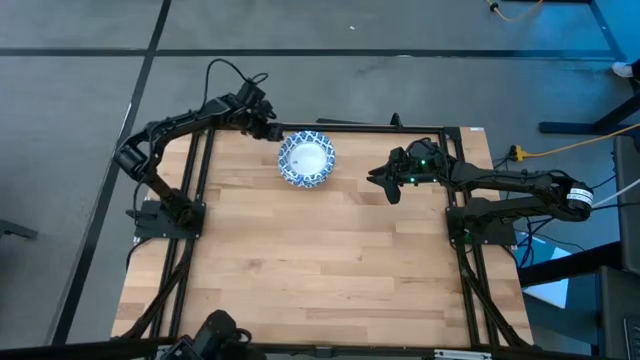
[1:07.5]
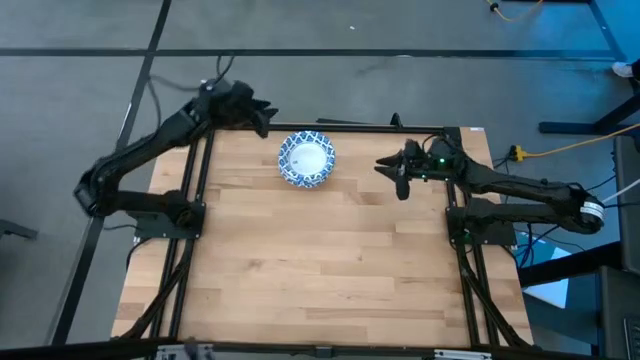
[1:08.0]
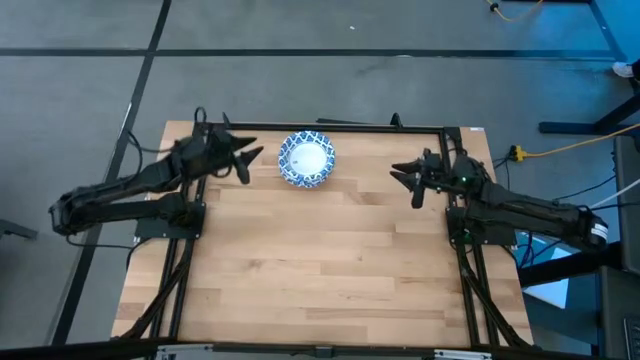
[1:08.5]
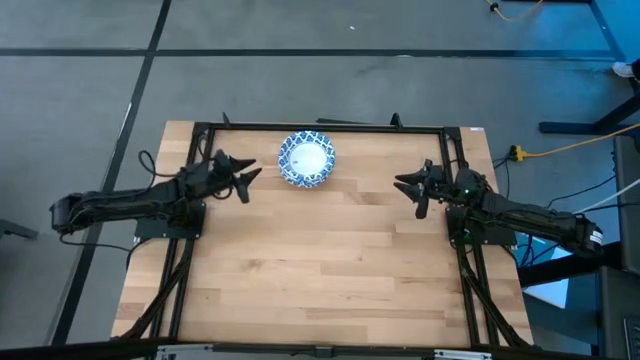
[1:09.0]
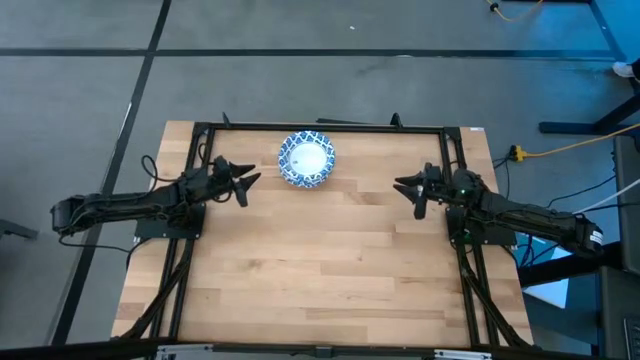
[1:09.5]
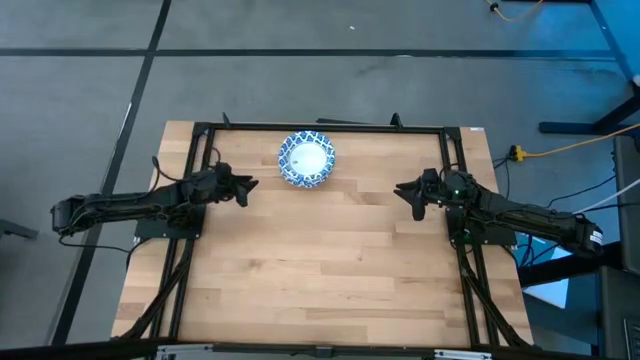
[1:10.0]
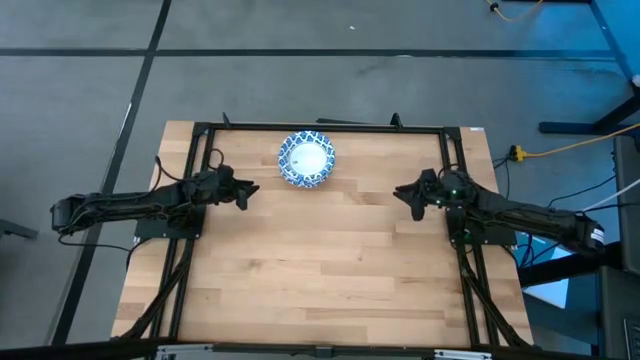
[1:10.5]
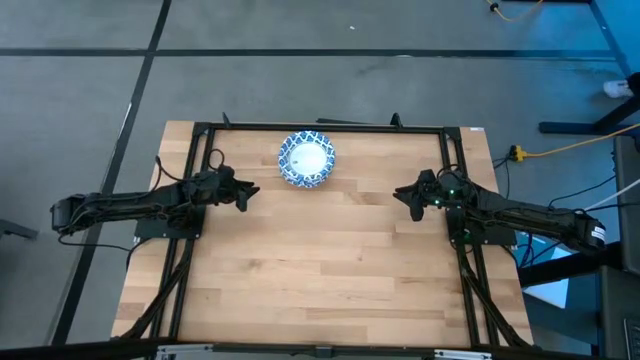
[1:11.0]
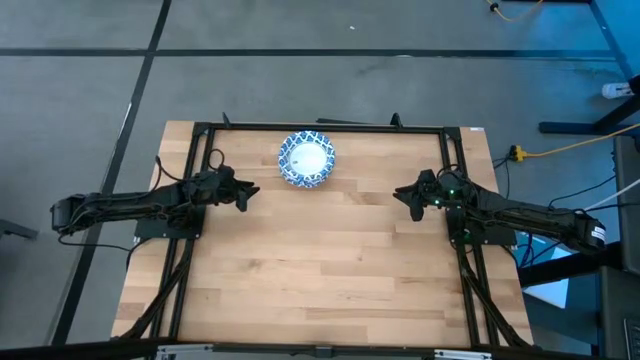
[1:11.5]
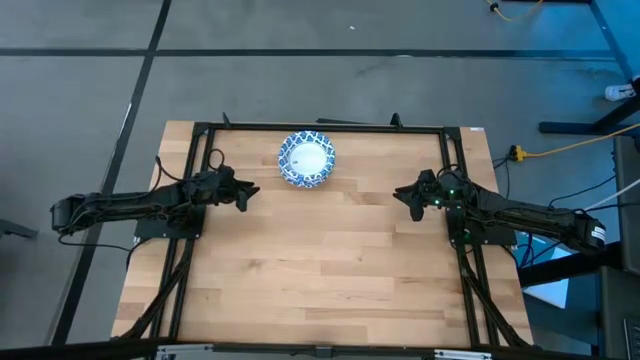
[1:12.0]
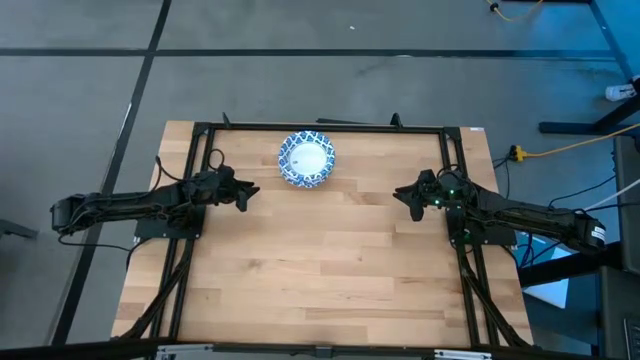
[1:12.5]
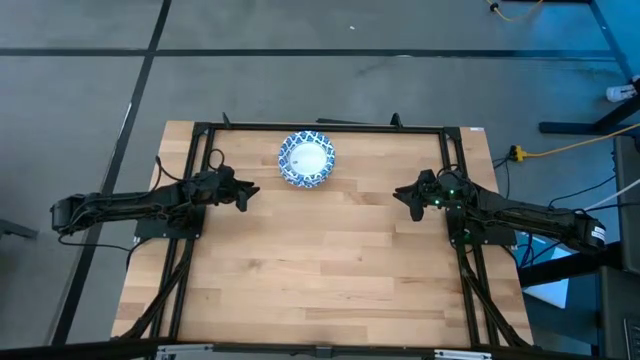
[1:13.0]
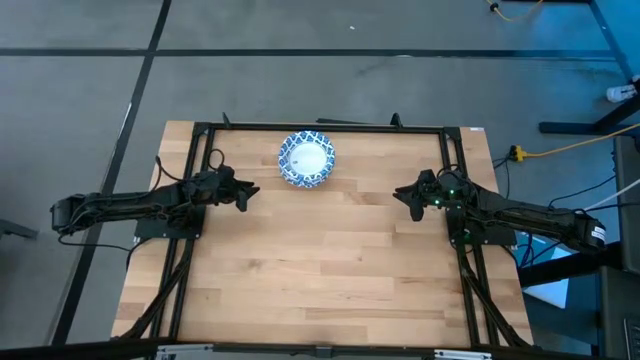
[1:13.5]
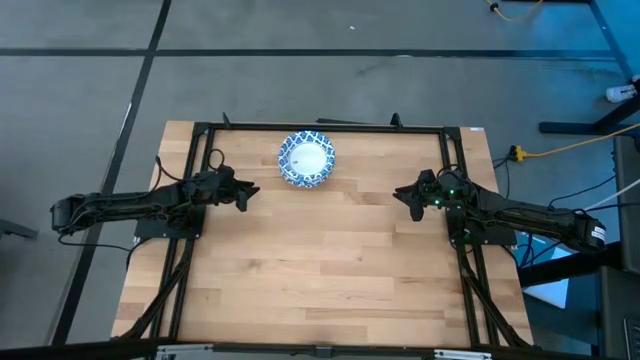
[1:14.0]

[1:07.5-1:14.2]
Task: Nest bowls inside each other
Return to Home Position

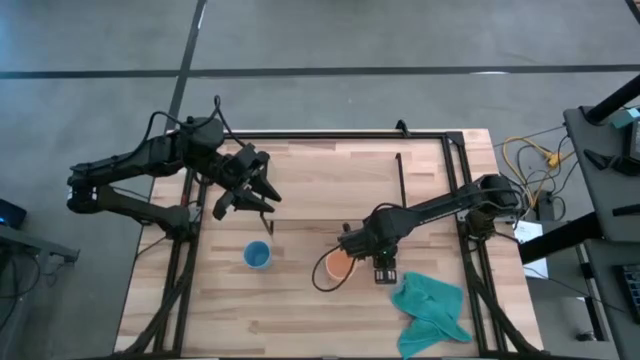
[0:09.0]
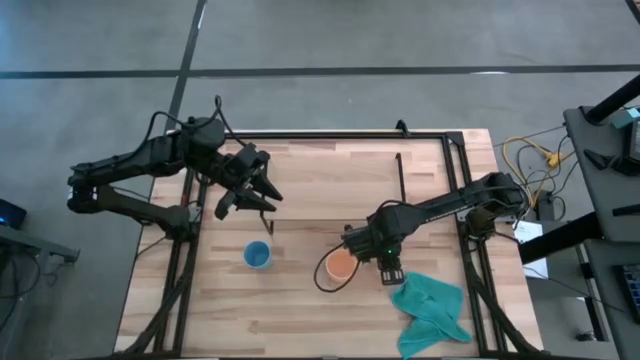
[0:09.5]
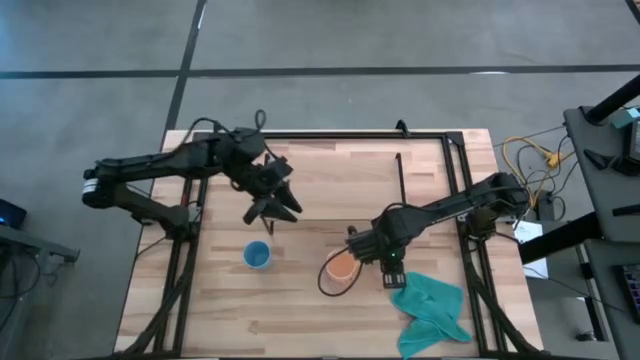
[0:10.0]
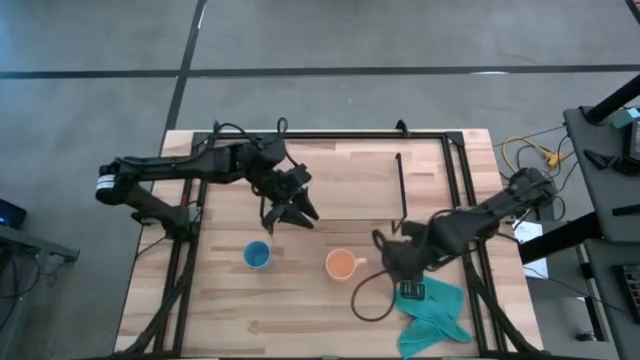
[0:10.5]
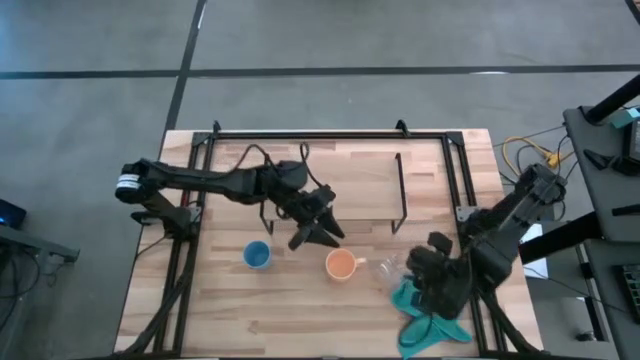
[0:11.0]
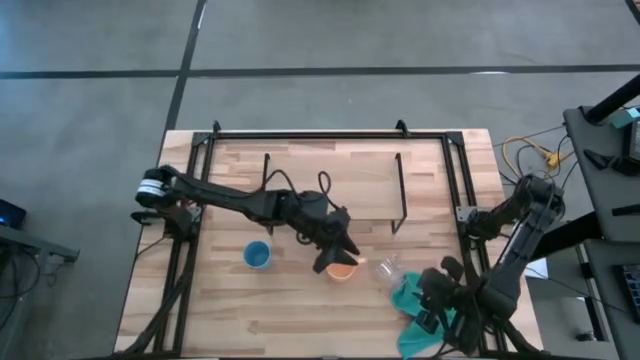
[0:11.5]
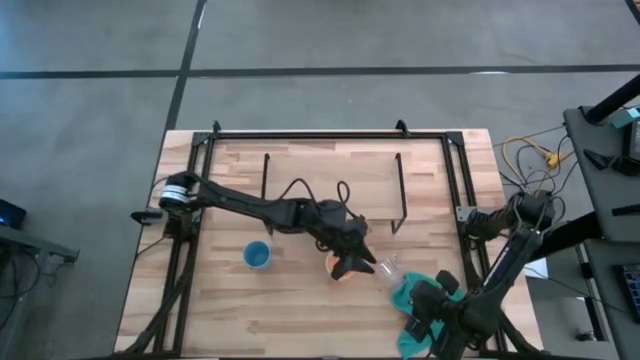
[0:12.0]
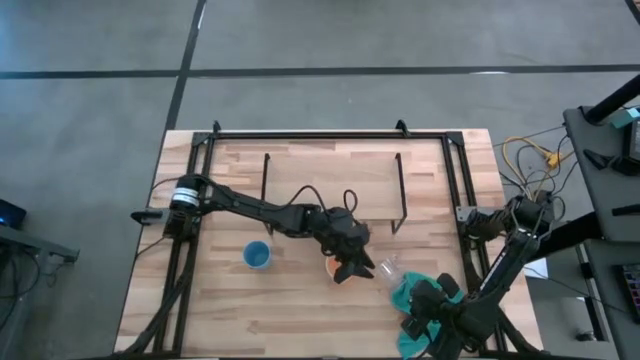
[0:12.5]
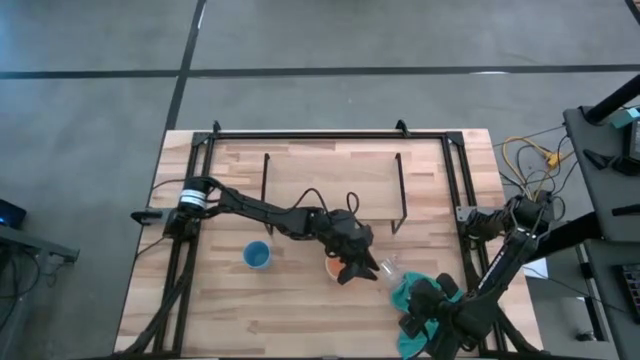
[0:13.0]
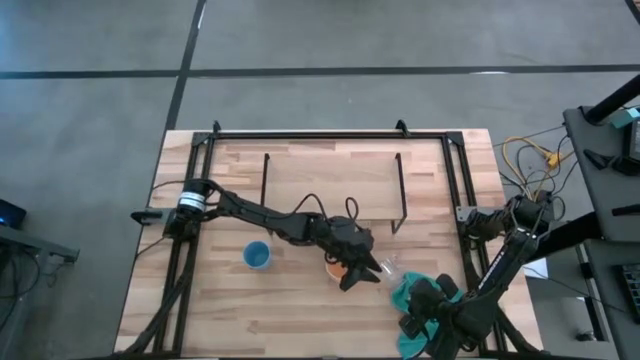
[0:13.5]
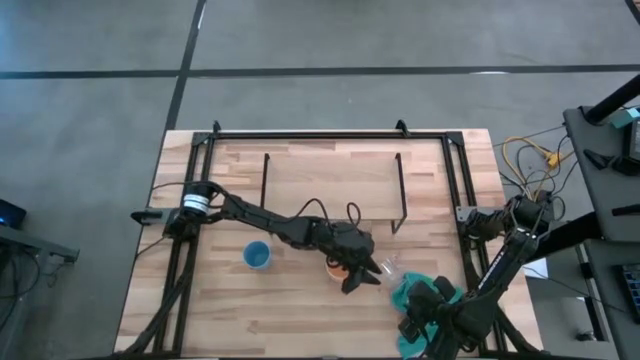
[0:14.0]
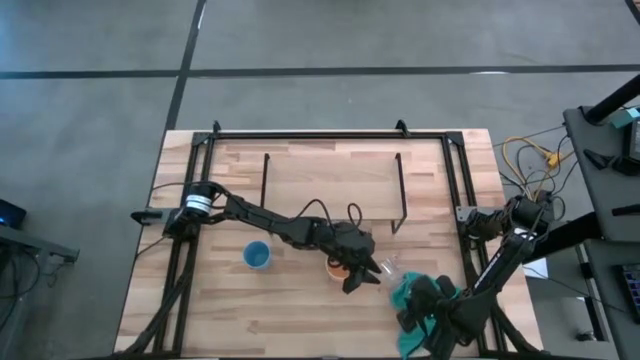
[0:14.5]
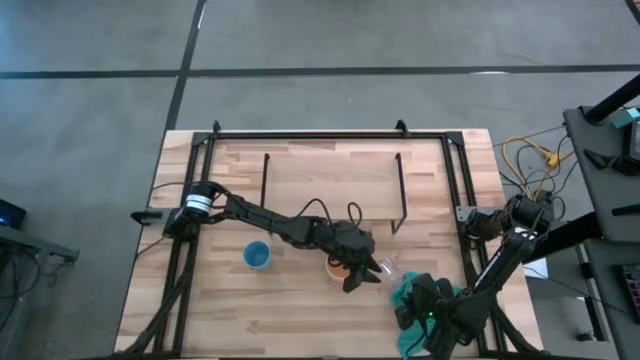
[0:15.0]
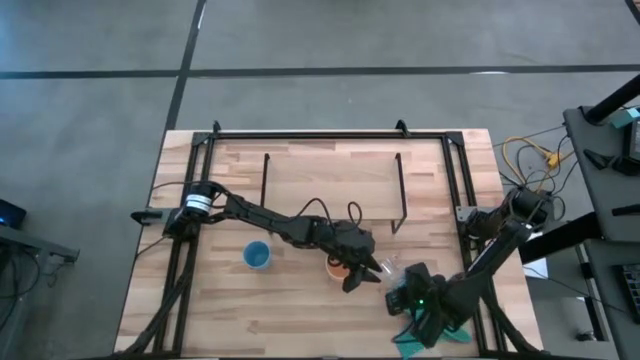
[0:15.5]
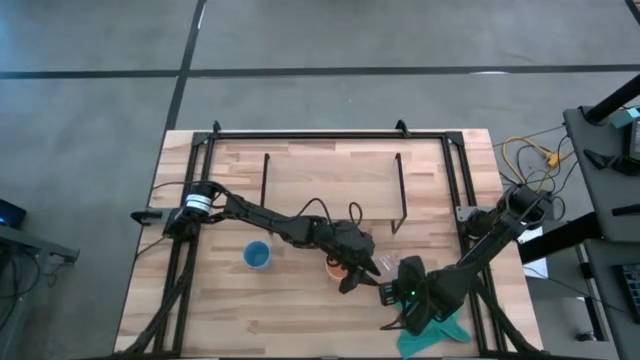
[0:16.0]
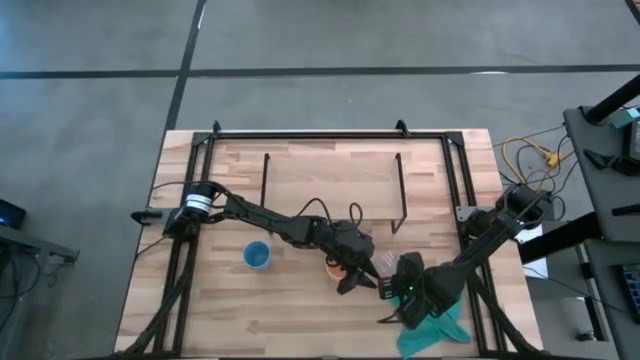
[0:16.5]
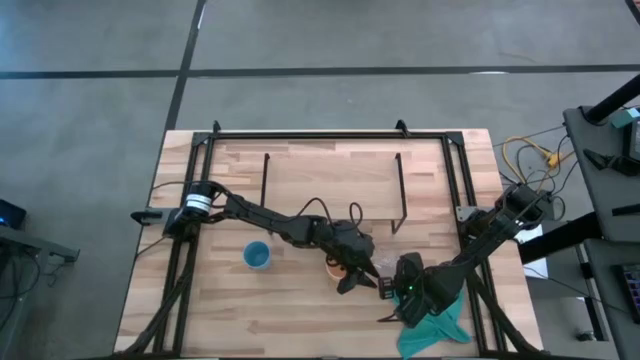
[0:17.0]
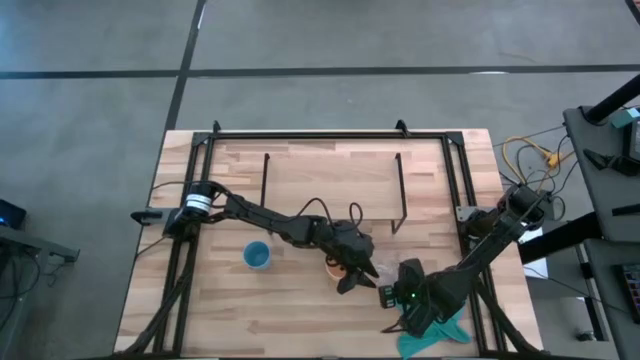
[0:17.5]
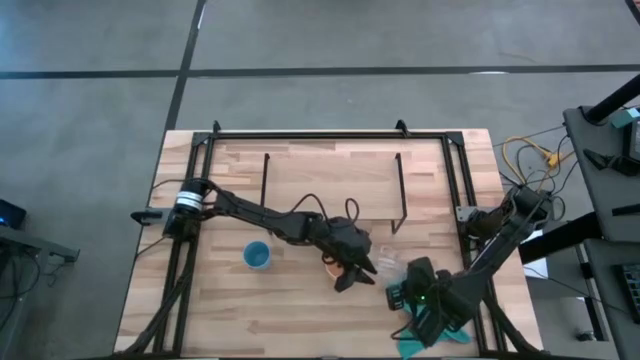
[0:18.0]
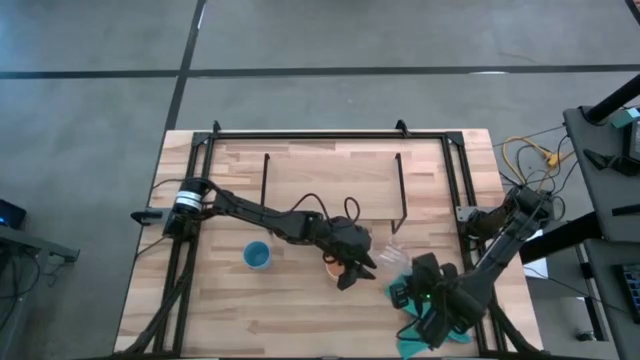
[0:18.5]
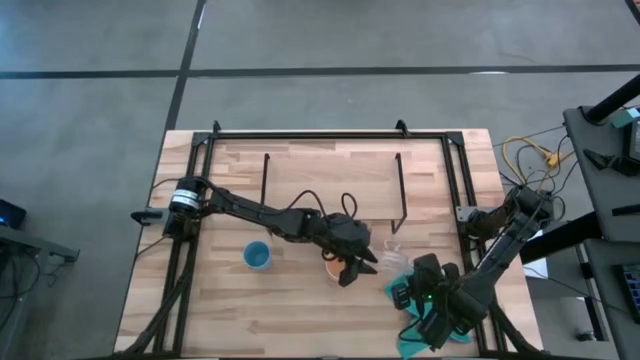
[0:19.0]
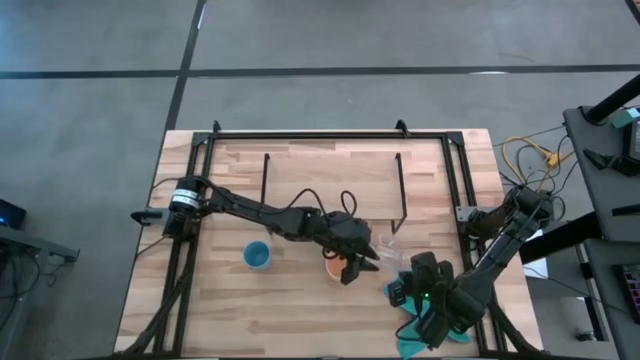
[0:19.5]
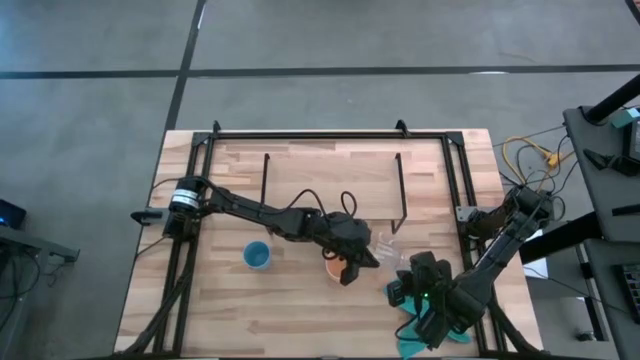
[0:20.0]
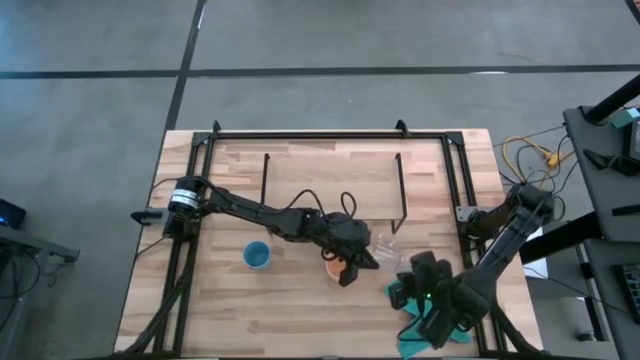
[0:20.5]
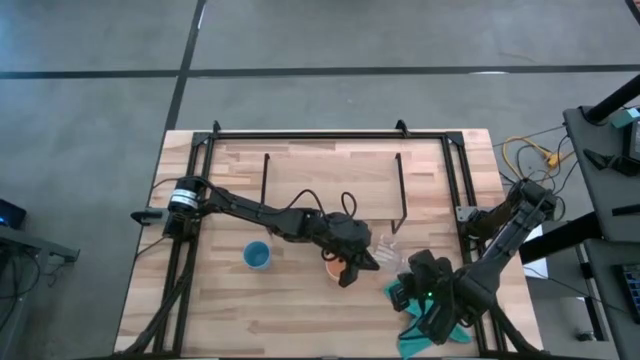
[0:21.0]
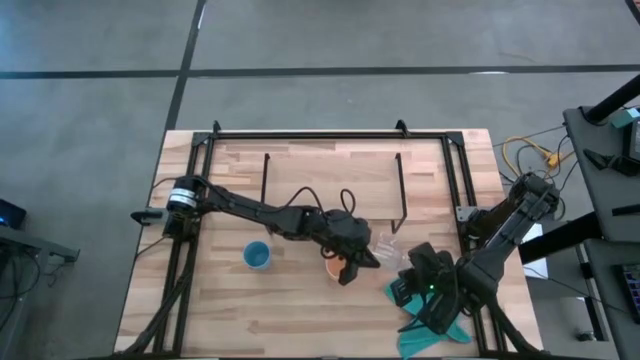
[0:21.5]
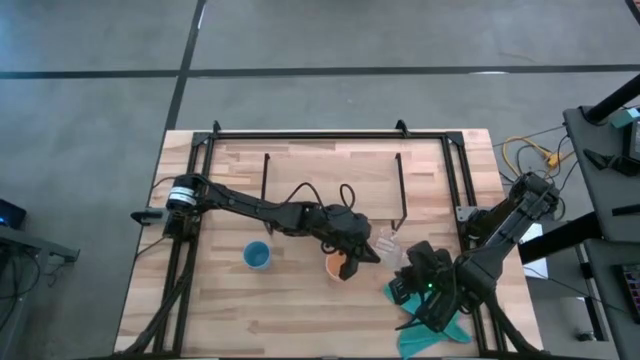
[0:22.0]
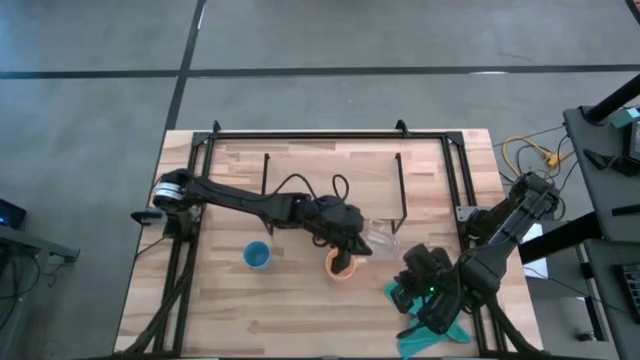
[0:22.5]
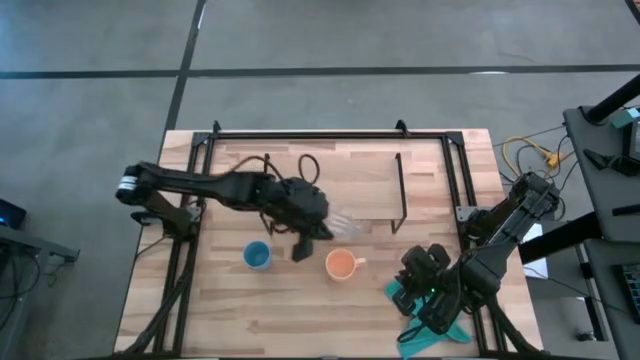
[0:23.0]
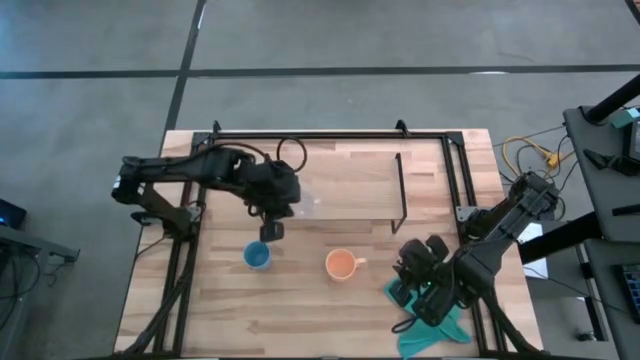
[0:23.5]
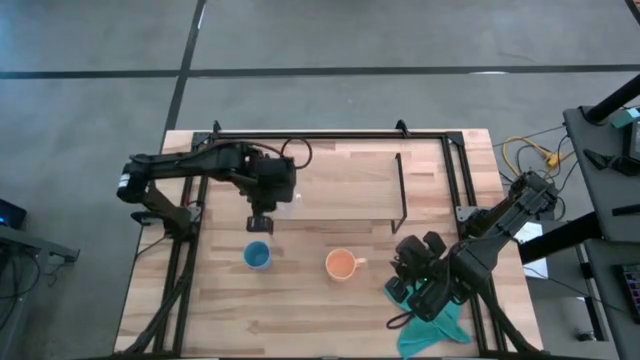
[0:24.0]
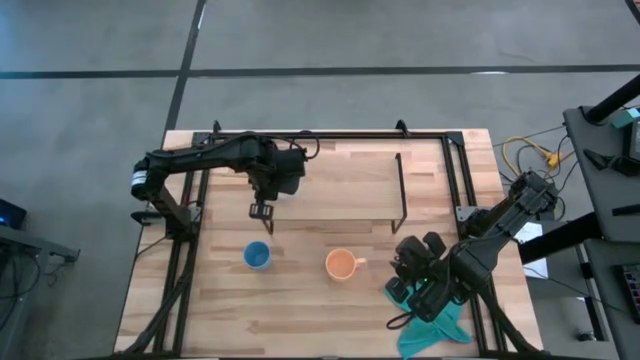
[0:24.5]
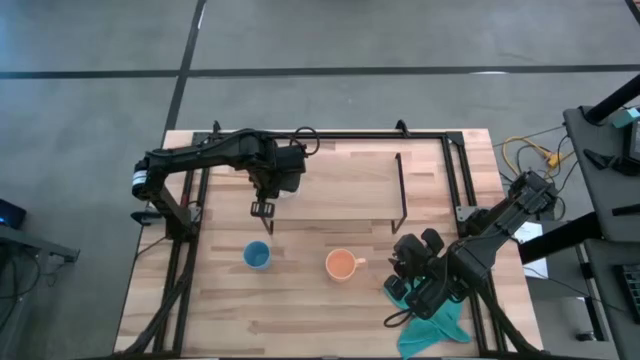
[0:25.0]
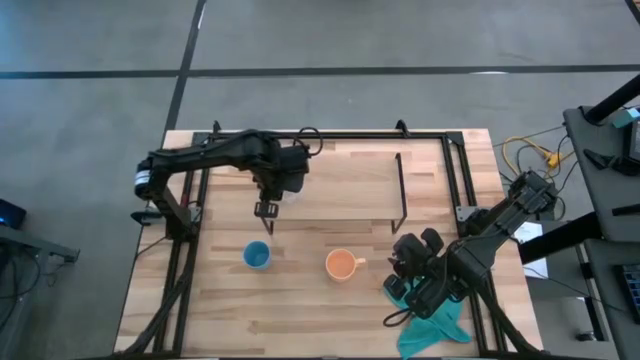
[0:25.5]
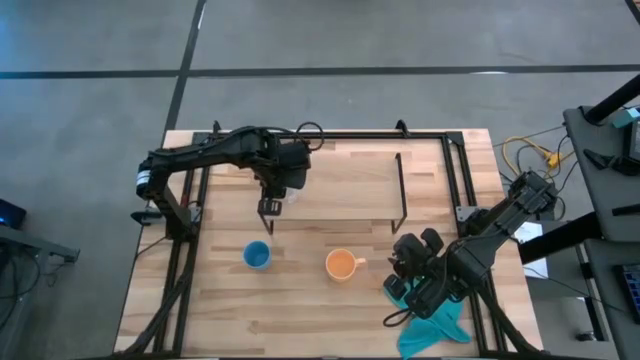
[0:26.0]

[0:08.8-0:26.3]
Task: Stack small to large cups/mugs on shelf
Put the transparent mug on the shelf
